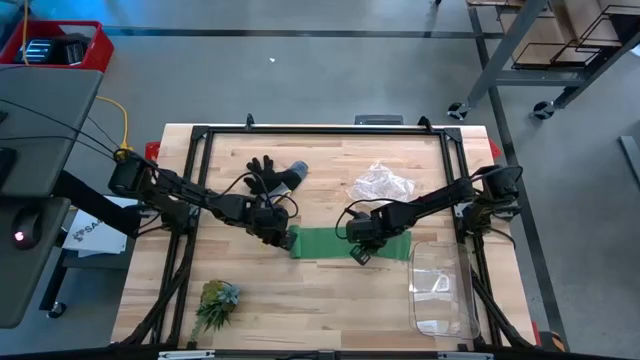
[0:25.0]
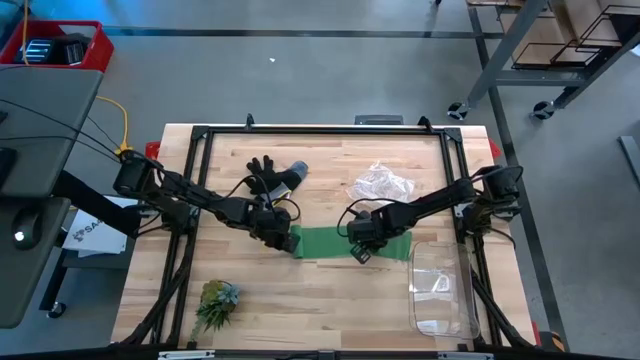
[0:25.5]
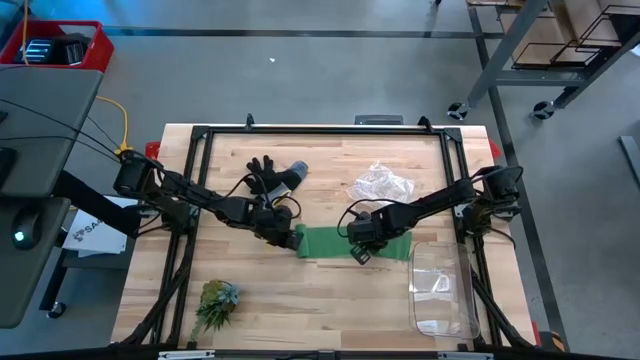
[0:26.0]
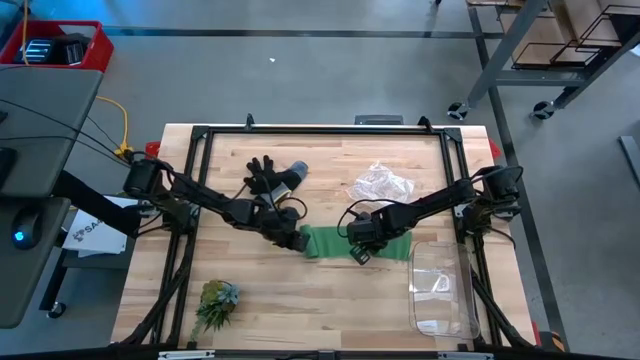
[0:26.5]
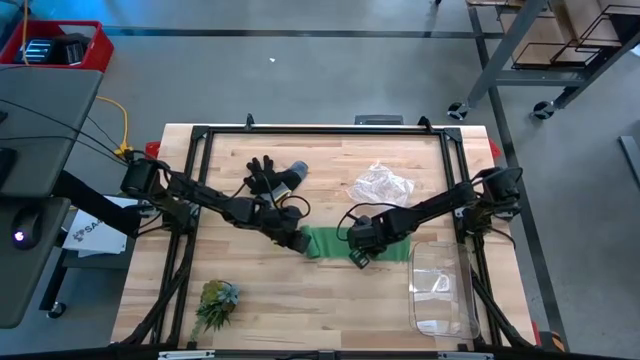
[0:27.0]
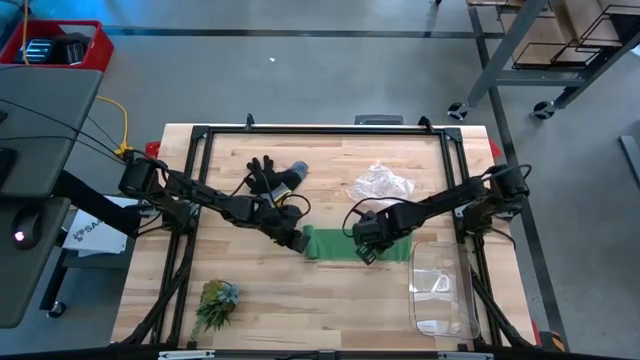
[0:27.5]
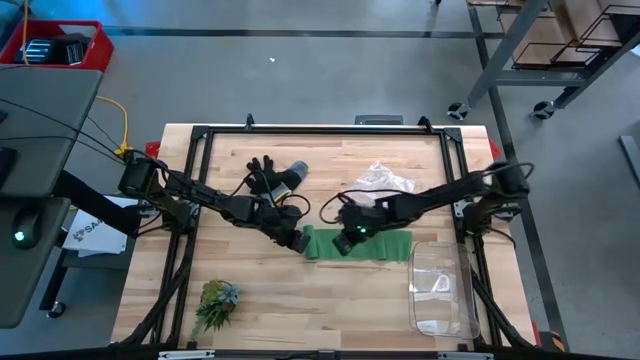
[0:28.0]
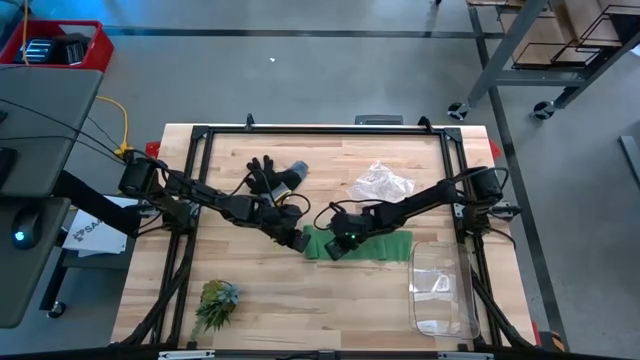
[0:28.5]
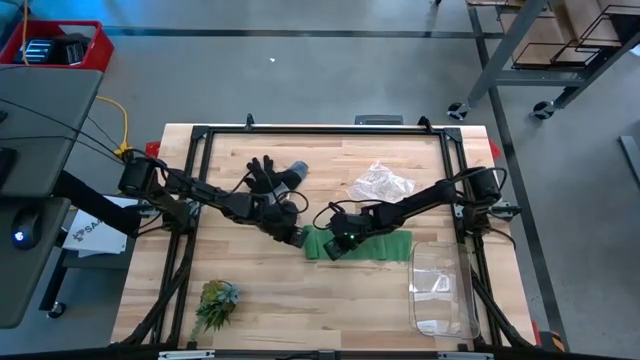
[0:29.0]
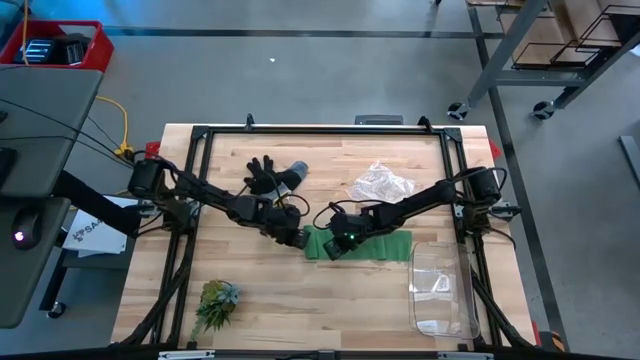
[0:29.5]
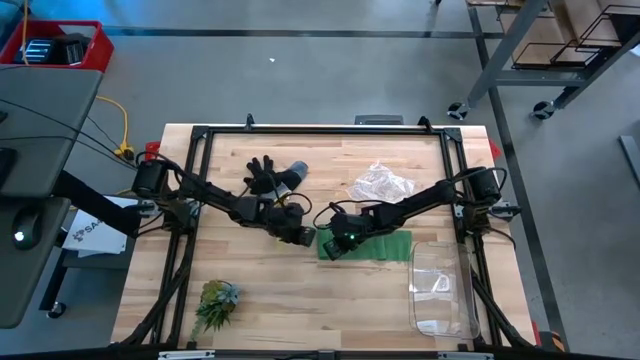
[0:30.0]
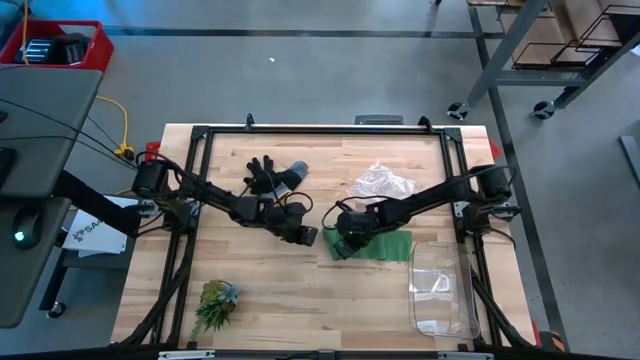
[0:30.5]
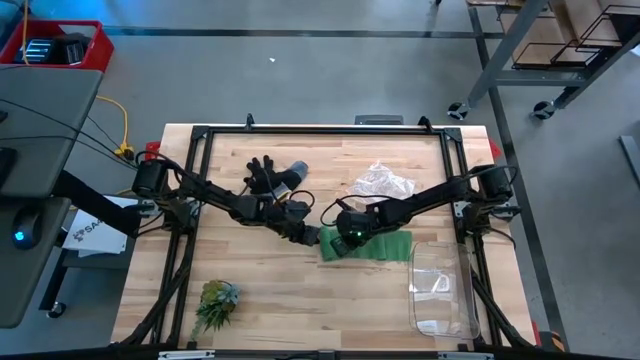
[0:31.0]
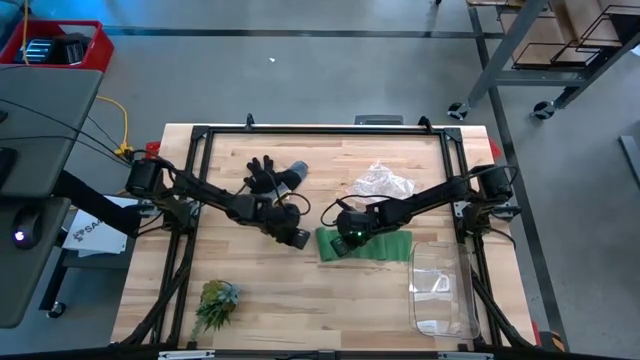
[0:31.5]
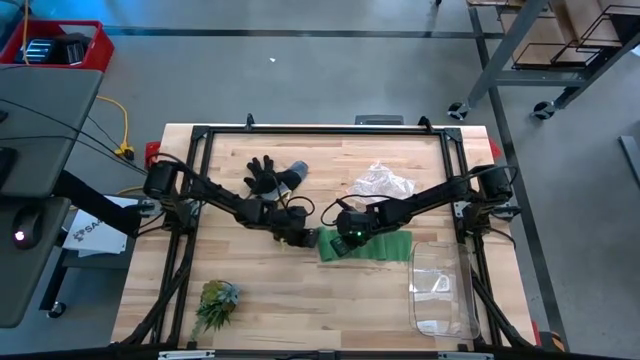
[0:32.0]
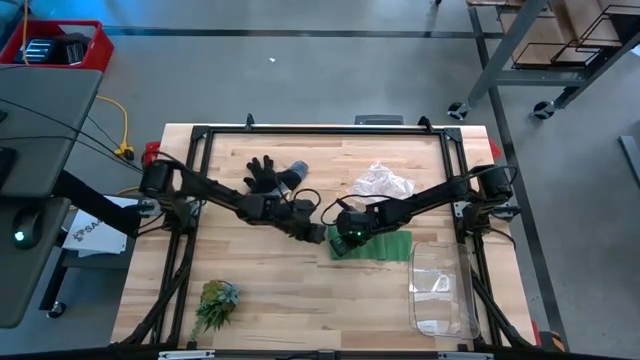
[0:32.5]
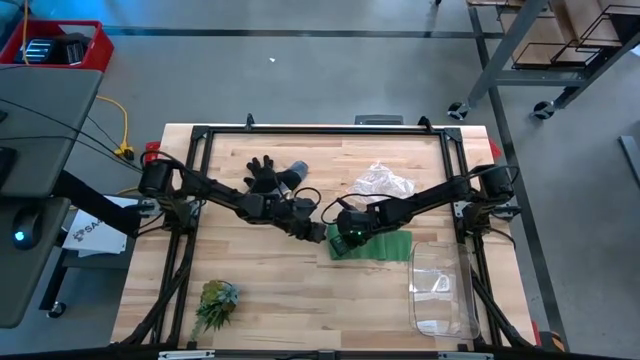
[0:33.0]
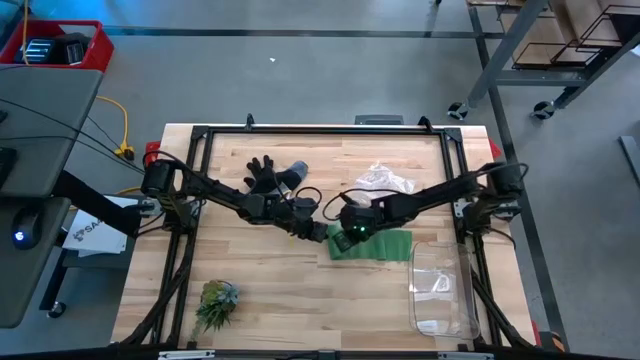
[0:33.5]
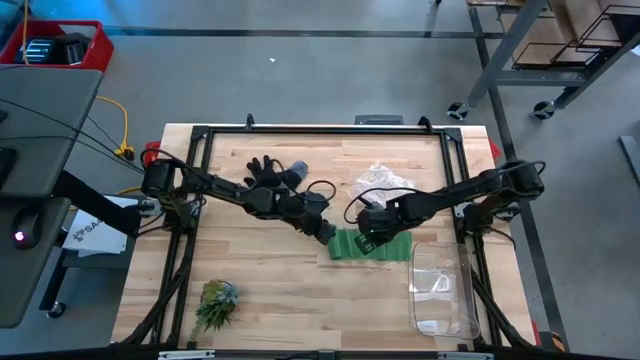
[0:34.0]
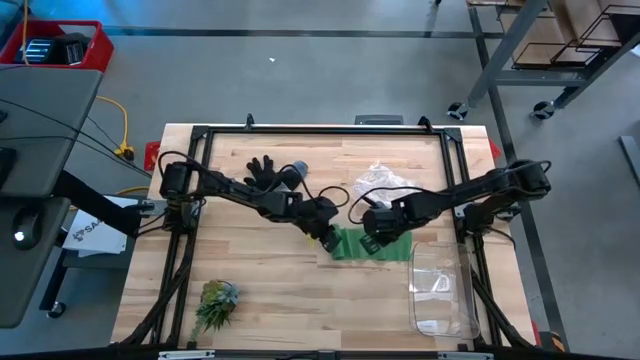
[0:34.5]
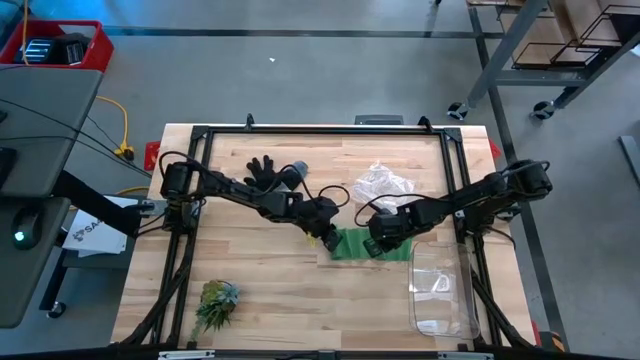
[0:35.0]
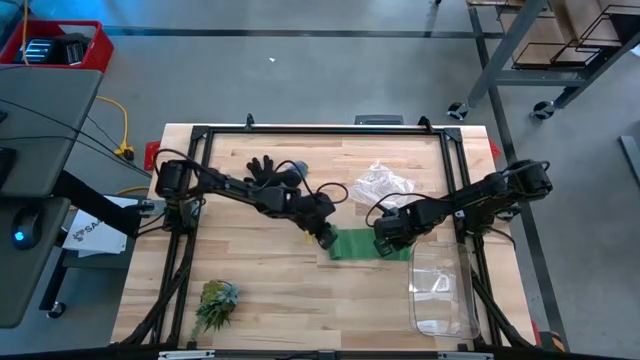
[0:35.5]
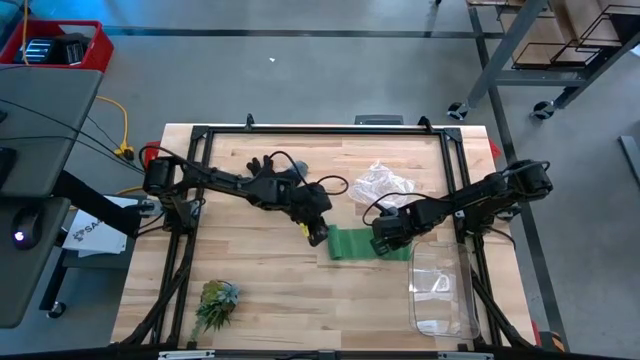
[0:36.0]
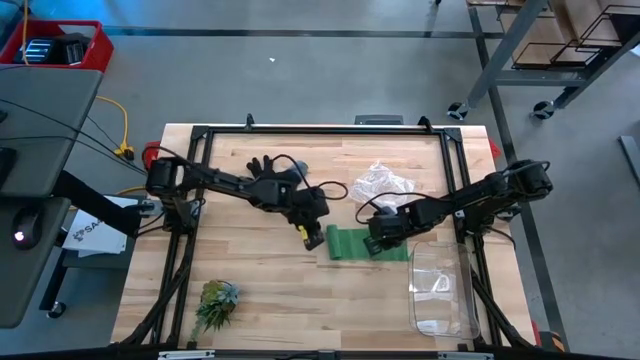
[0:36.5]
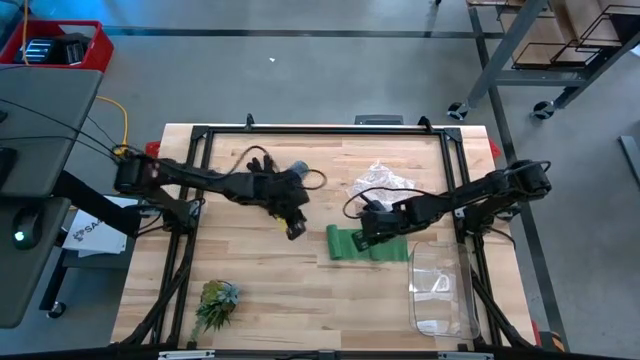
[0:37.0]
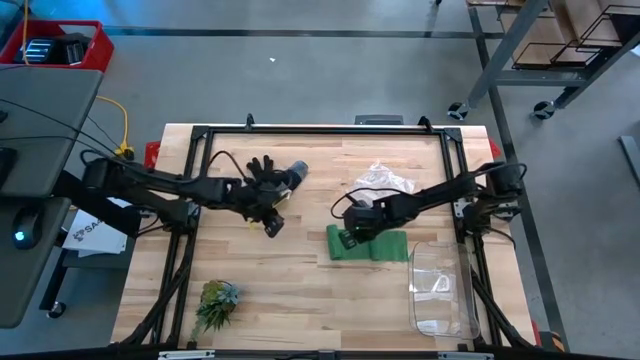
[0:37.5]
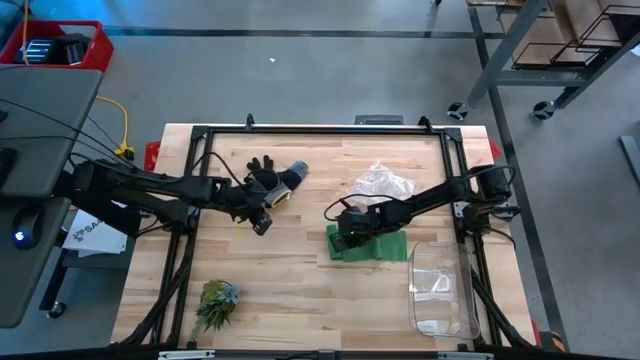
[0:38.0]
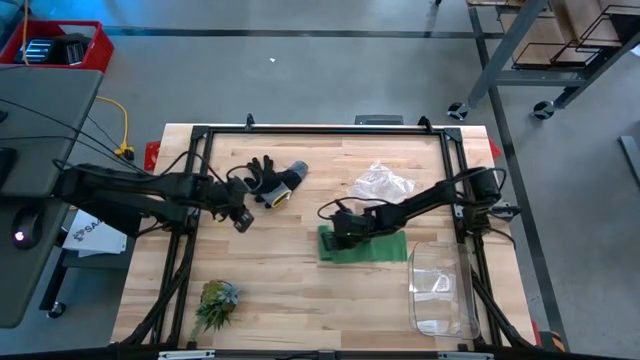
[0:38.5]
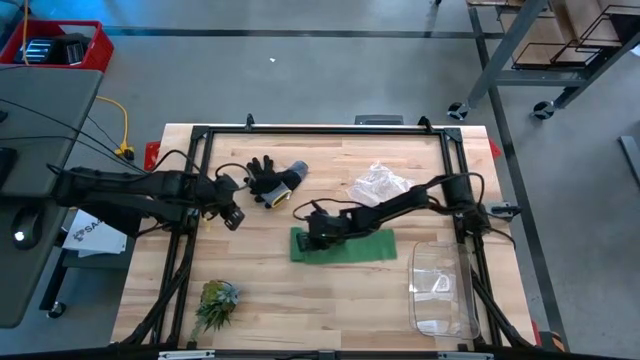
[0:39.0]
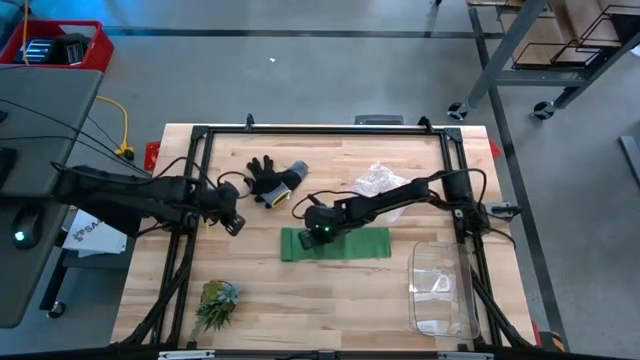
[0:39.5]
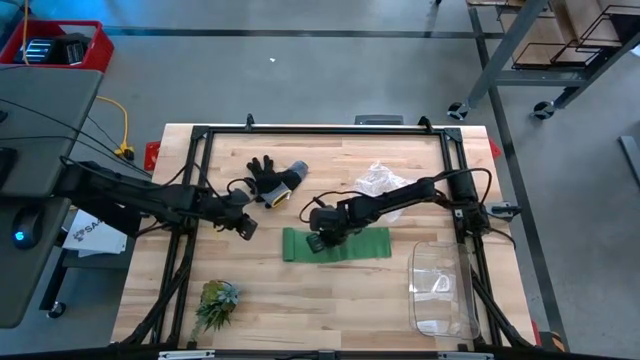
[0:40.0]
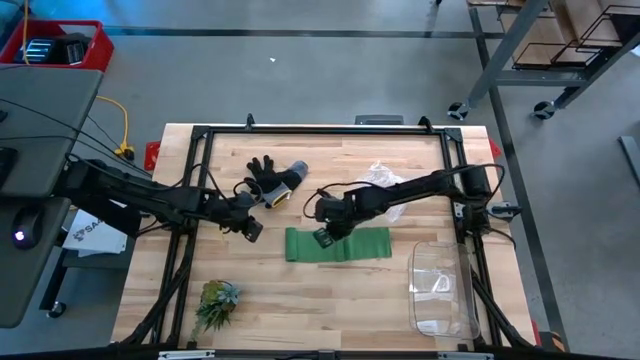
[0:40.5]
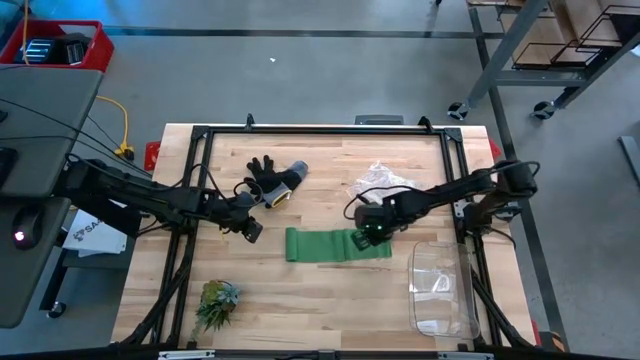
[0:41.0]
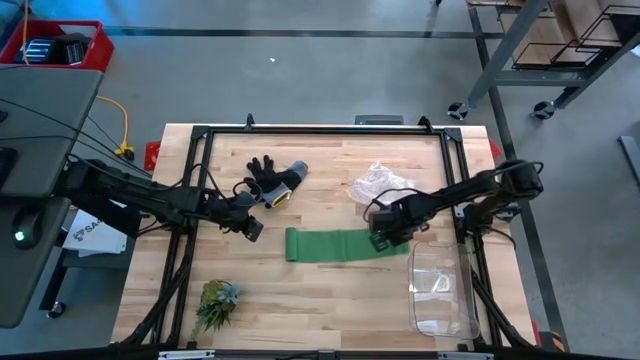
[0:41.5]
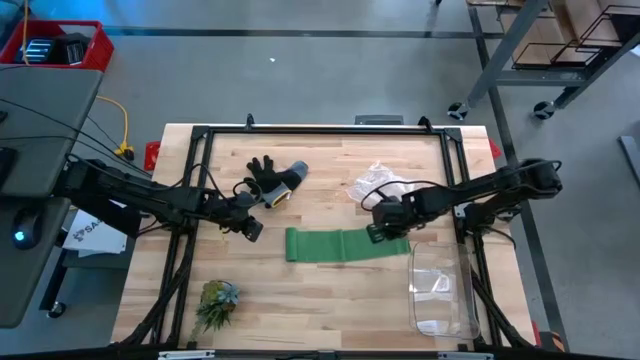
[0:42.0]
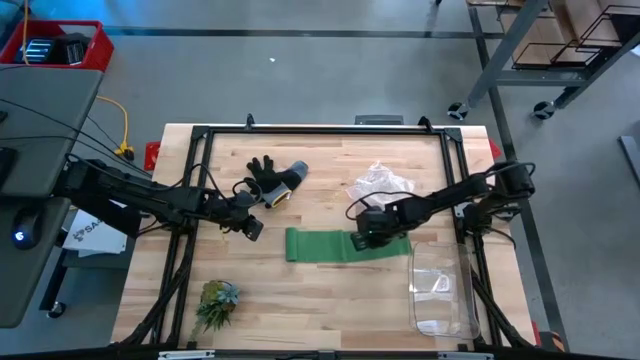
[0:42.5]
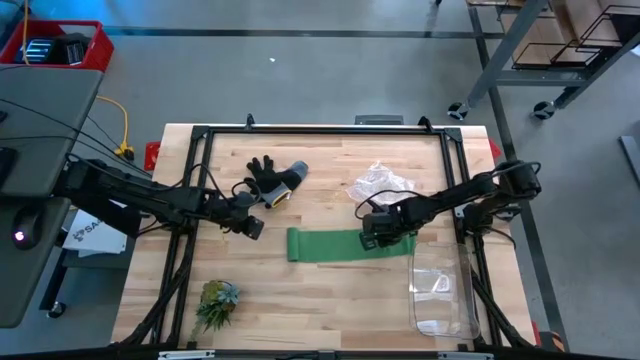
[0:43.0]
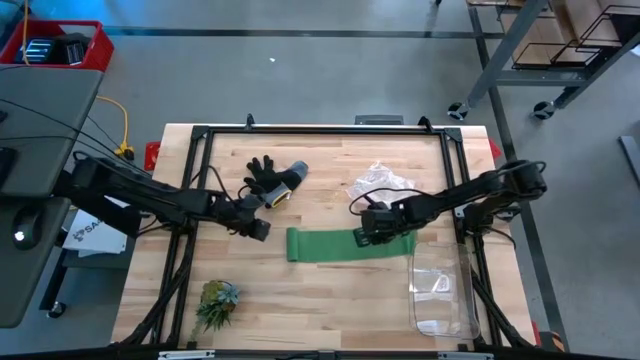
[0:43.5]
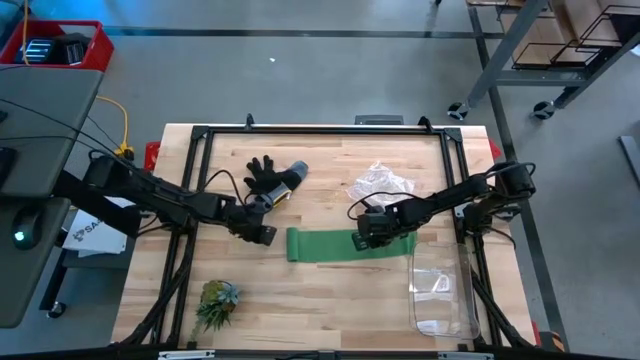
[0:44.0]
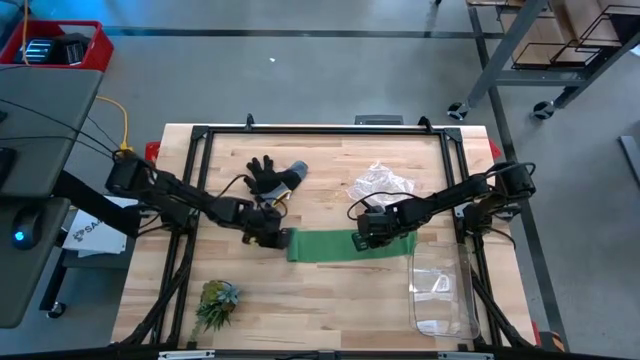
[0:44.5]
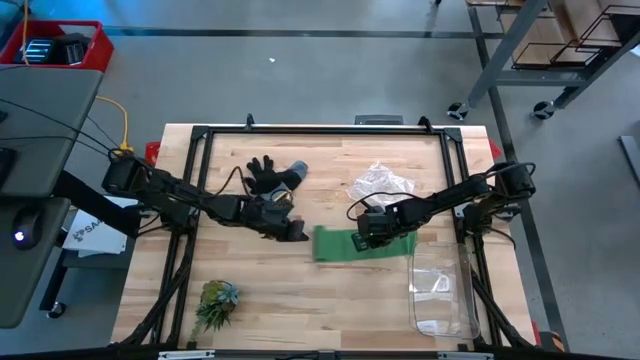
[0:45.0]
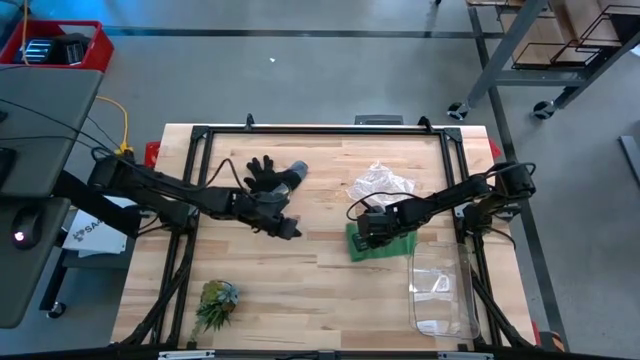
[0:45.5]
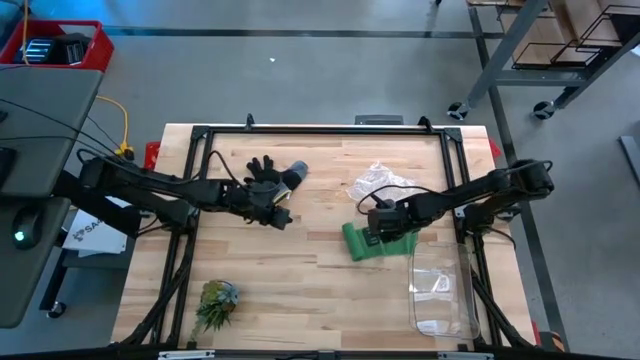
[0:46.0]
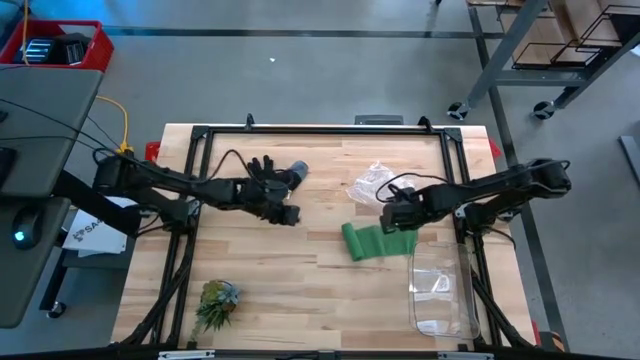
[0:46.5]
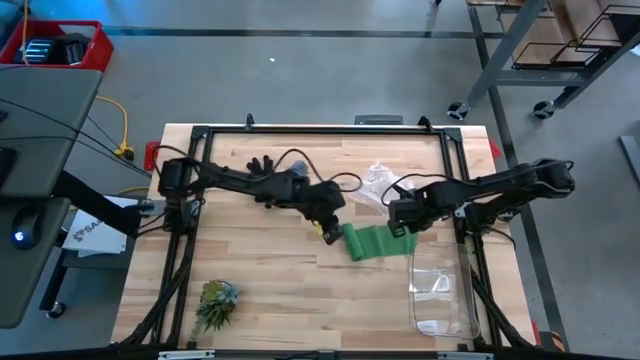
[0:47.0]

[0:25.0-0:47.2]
Task: Roll bandage
Roll the green bandage
